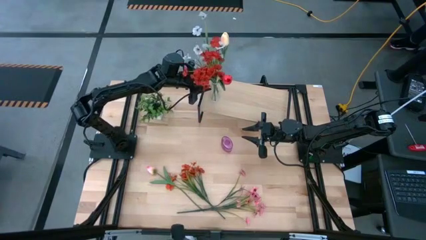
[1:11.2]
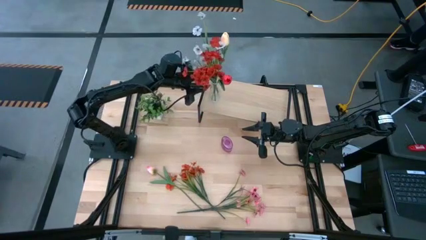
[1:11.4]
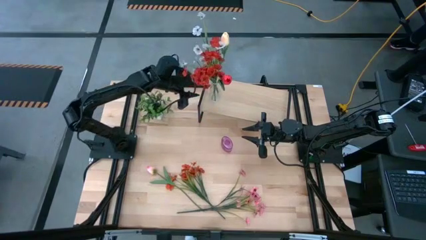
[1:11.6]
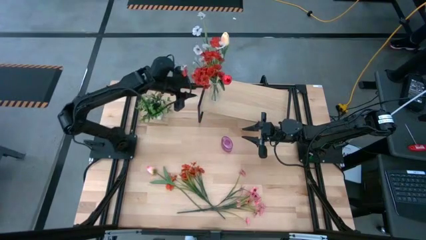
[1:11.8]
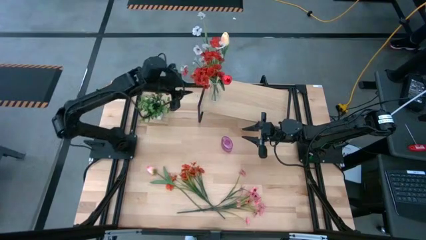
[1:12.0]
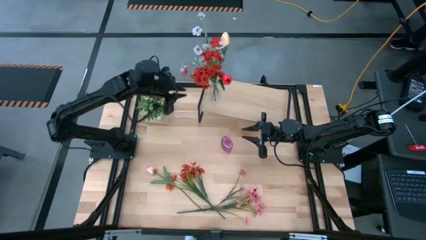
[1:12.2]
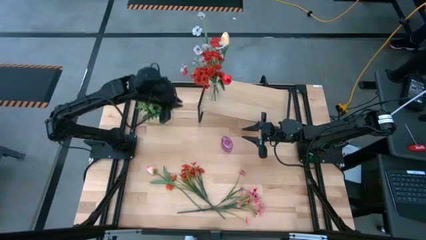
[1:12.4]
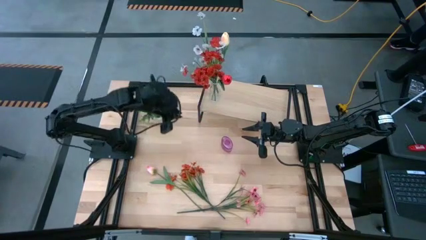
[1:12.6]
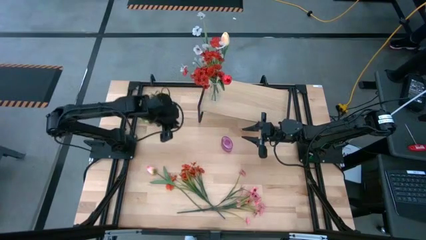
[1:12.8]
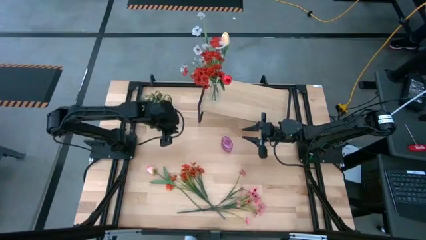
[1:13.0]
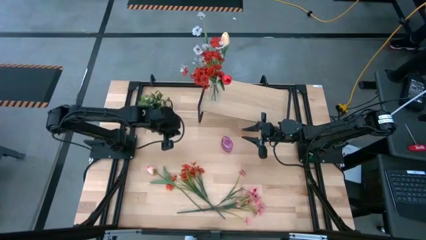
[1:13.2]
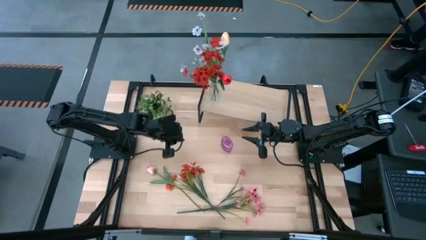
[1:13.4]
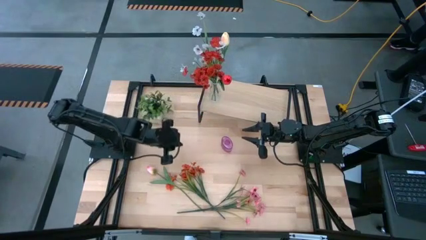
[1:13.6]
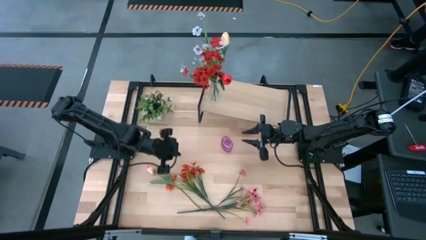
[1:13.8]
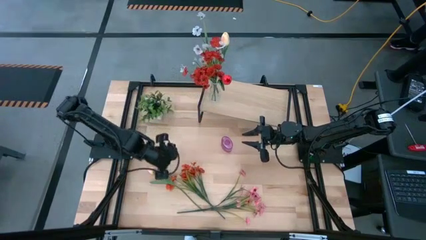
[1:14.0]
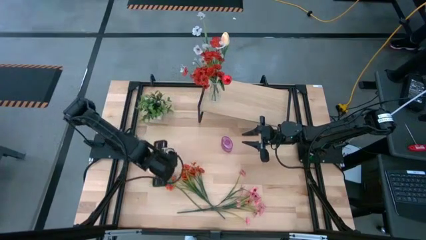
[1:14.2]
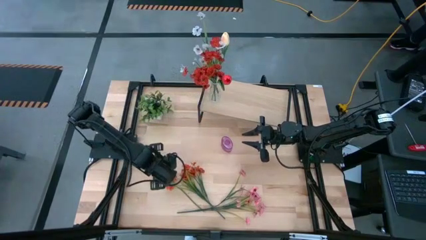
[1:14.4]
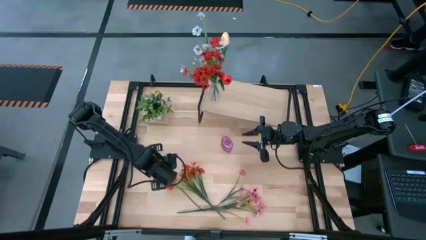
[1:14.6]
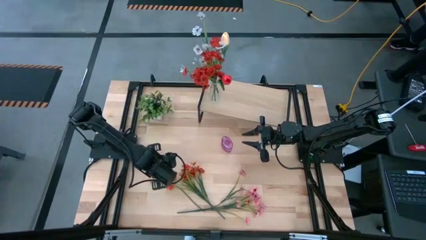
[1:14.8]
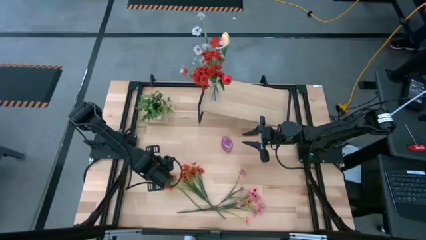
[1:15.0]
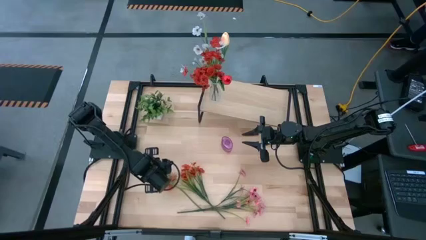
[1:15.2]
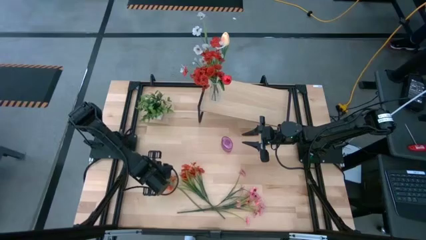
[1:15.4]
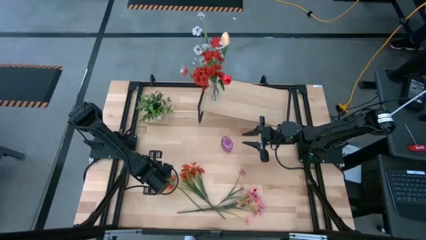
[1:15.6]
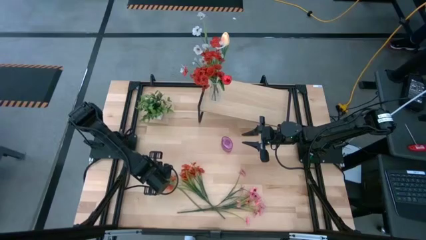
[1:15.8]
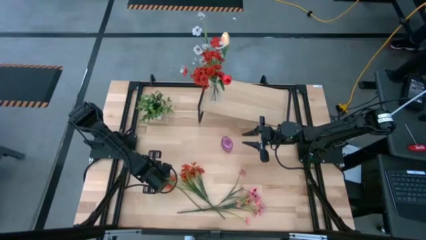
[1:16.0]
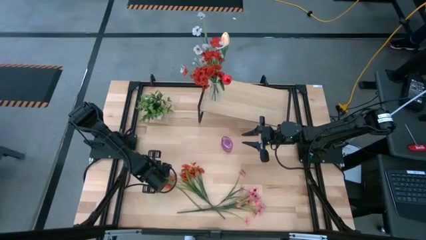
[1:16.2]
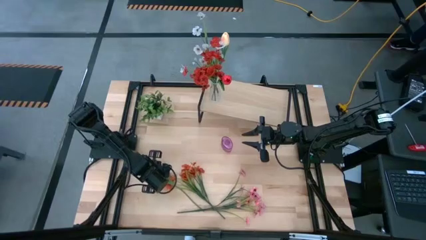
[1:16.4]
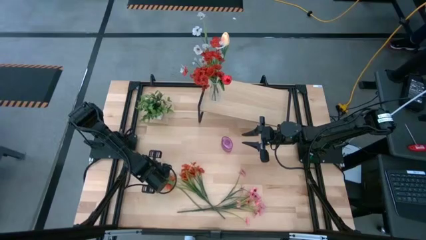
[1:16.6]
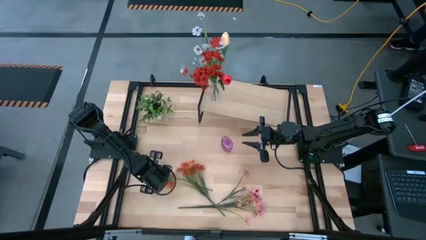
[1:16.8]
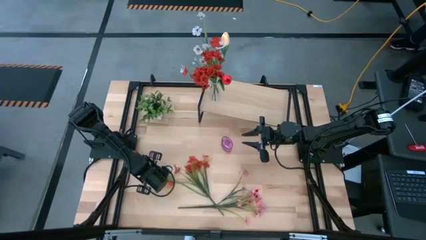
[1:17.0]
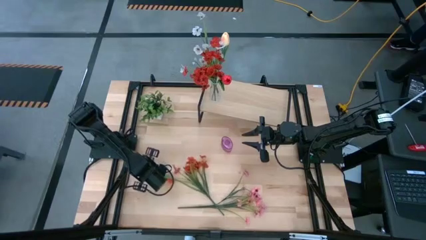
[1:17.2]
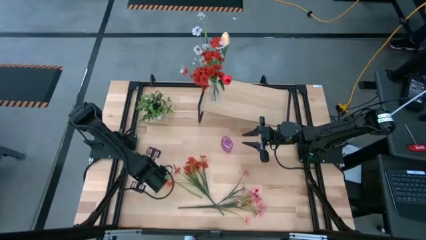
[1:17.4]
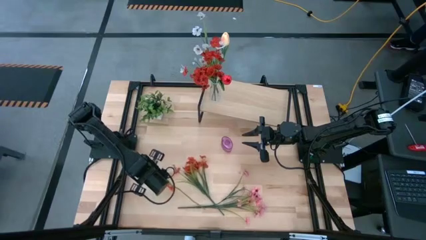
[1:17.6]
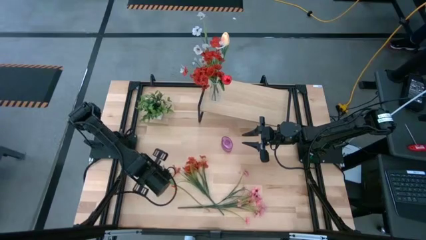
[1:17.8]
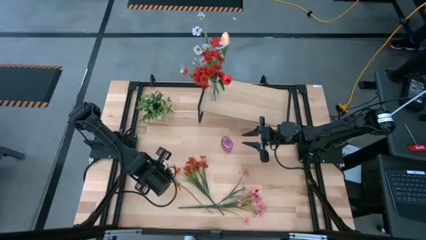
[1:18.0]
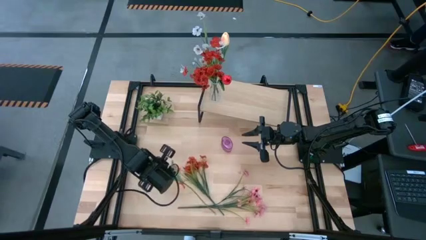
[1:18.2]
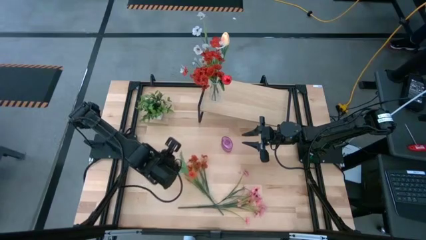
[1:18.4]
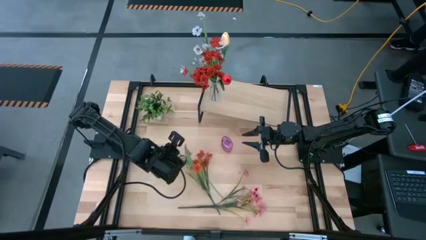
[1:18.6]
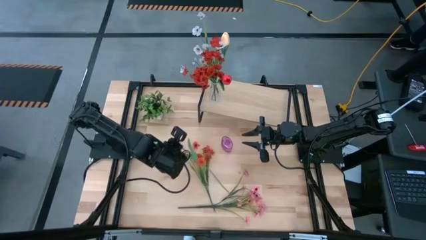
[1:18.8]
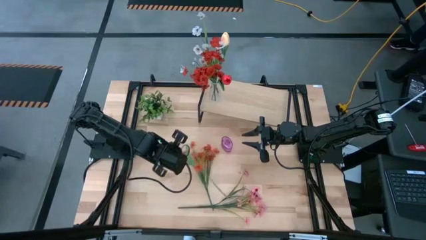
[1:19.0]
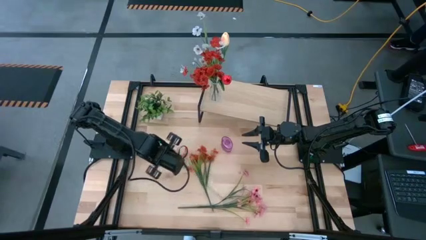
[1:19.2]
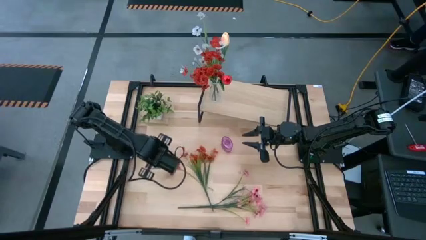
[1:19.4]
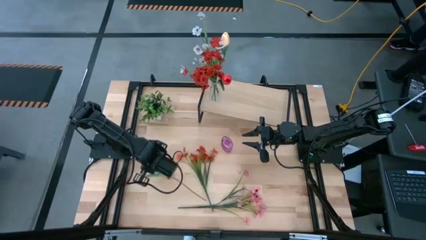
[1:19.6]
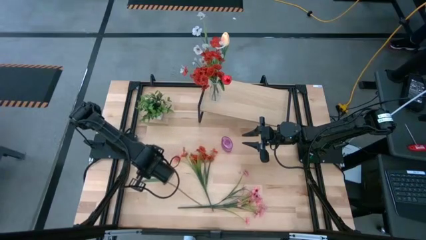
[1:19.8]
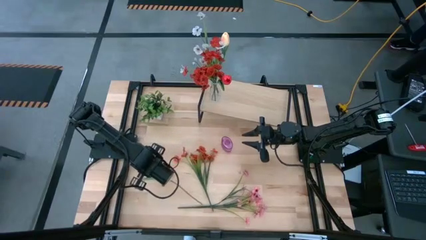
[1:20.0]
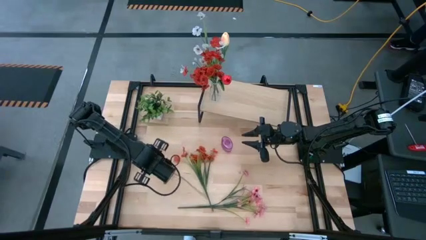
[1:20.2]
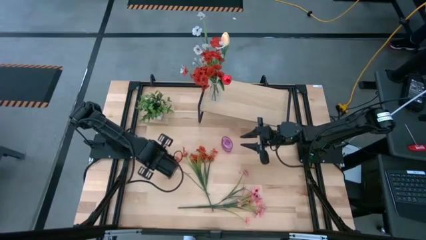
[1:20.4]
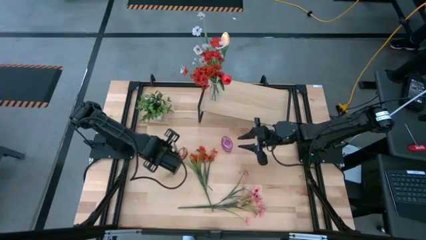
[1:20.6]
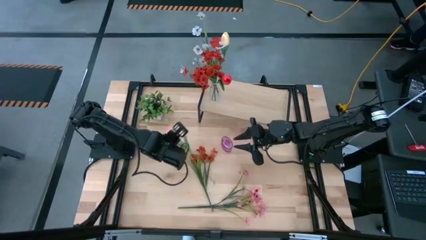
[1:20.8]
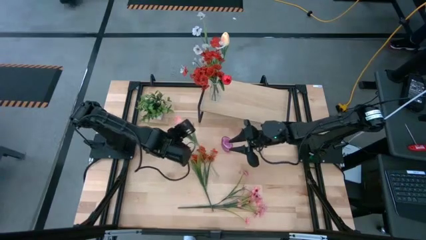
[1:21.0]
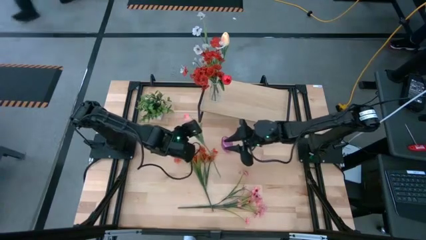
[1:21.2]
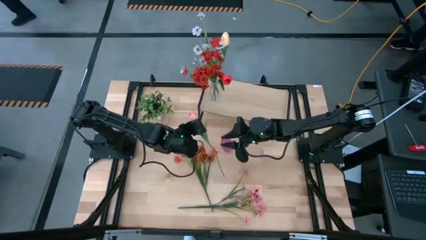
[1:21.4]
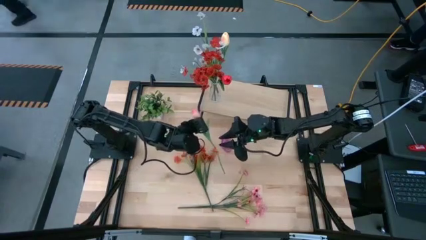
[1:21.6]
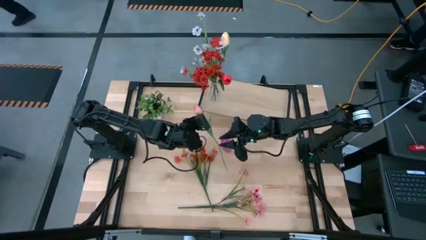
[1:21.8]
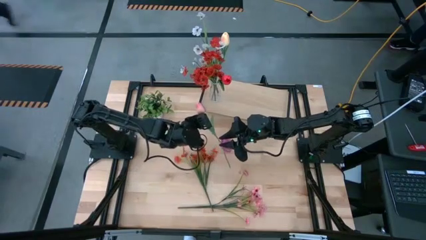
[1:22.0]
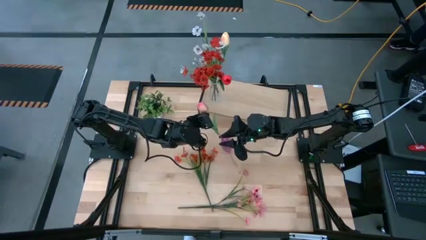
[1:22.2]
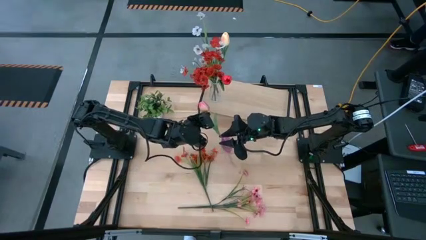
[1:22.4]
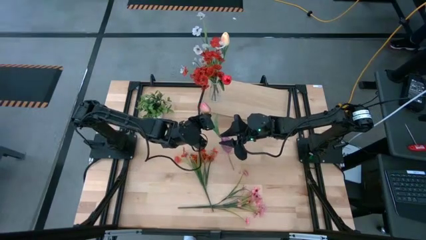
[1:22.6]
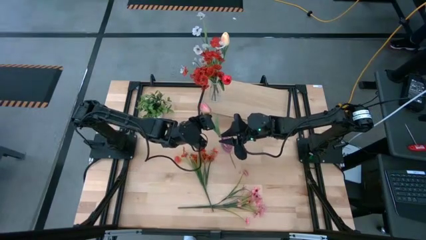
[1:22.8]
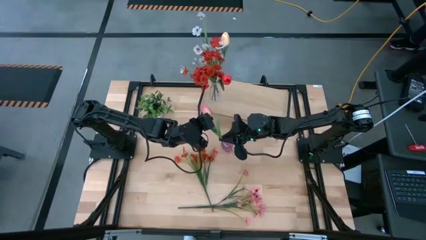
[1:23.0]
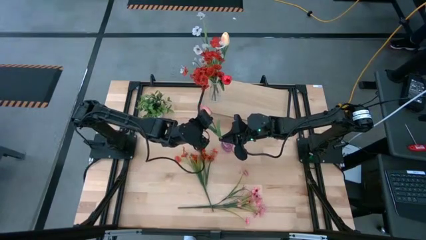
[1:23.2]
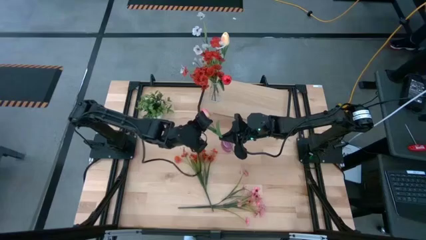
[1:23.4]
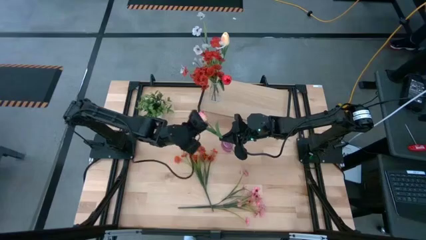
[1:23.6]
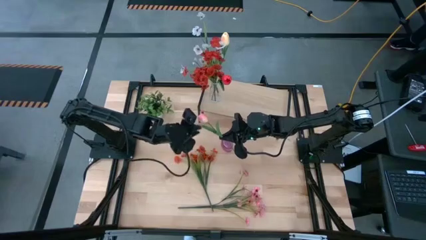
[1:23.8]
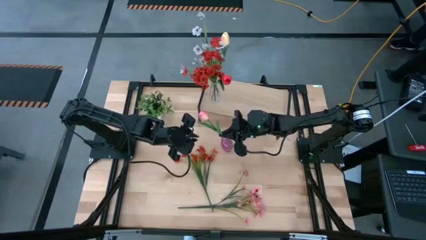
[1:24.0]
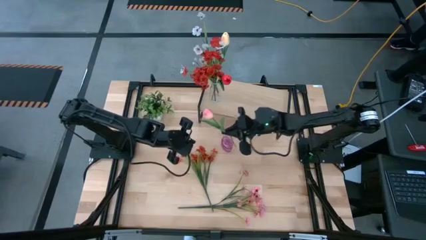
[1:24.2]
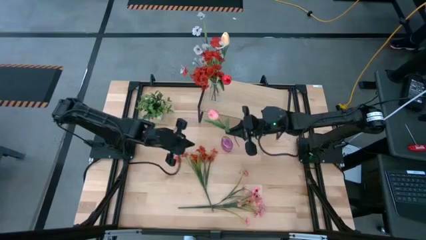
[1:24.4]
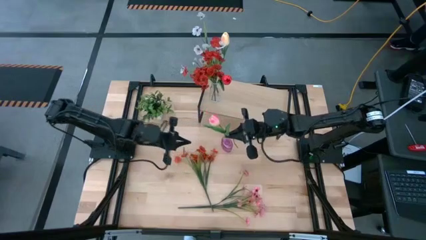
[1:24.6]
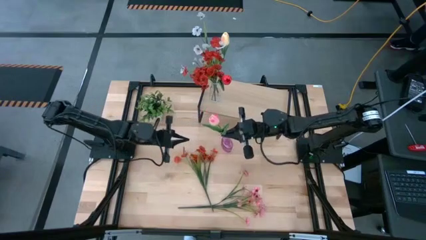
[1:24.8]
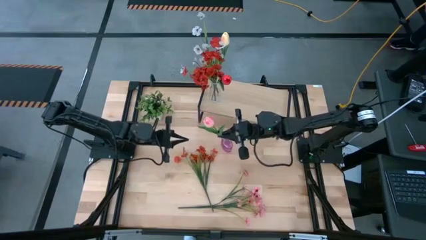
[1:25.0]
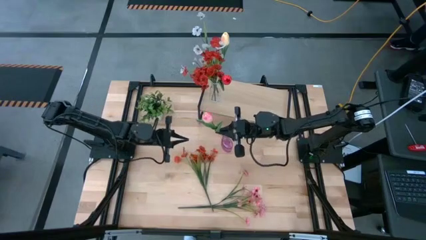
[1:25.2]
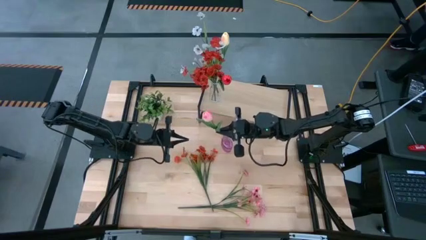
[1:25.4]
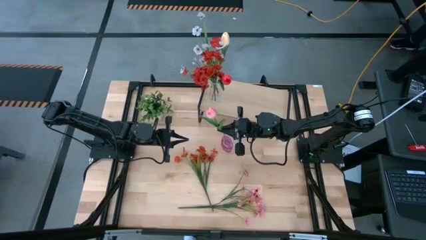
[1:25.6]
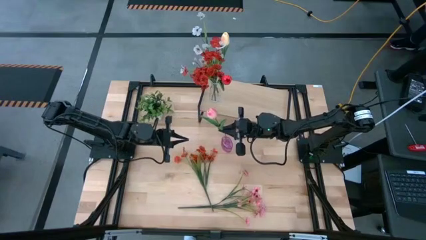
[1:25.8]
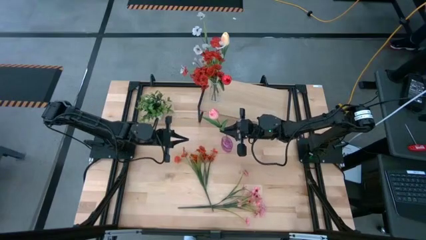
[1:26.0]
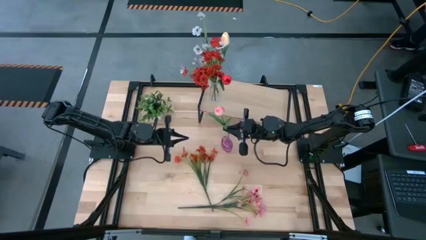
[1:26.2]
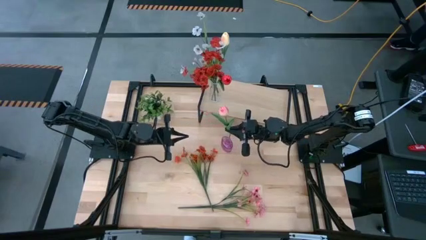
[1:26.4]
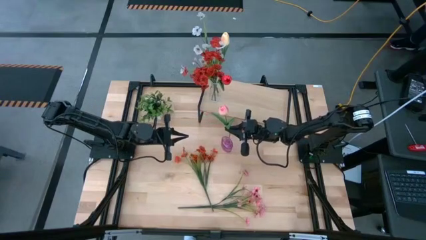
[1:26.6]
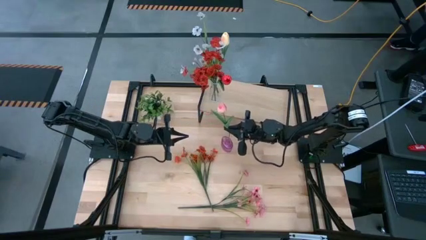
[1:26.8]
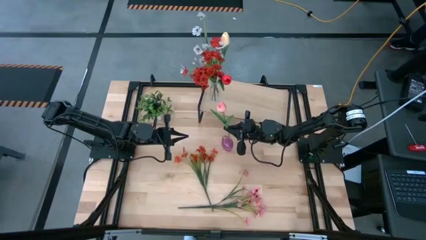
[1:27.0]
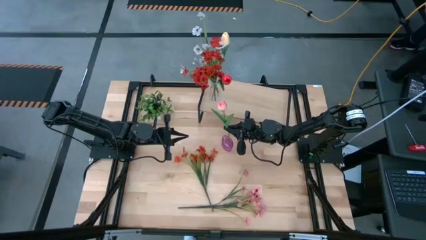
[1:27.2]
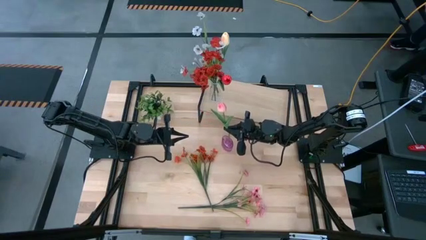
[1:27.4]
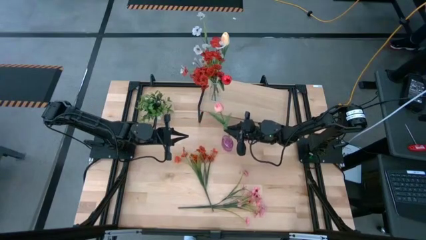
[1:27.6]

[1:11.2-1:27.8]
Task: Pick and place flowers into a vace then onto a shelf
Put the pink tulip into the purple vase
